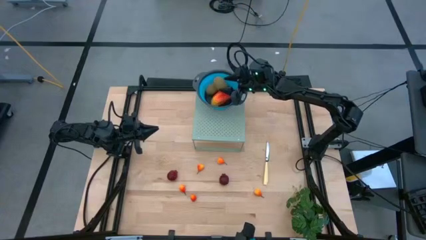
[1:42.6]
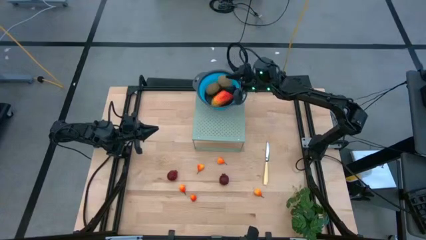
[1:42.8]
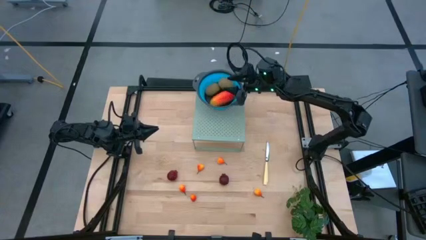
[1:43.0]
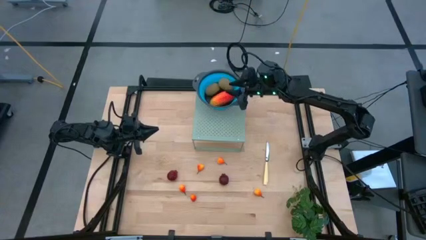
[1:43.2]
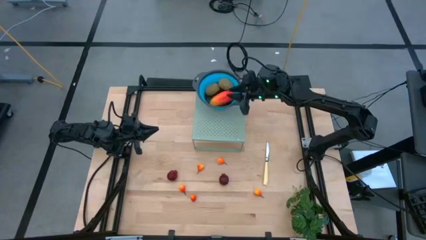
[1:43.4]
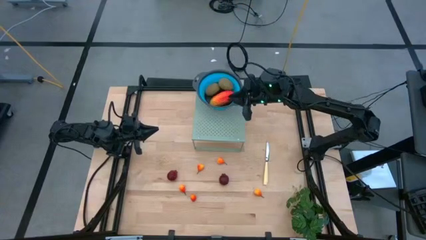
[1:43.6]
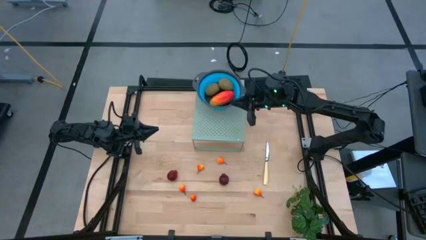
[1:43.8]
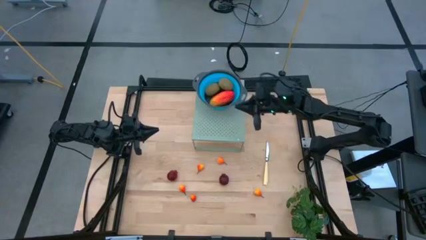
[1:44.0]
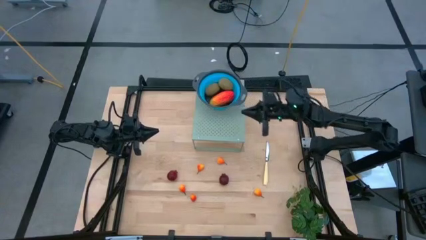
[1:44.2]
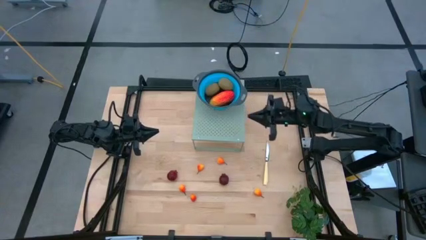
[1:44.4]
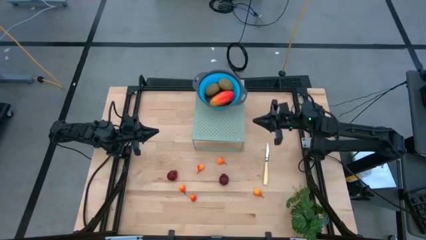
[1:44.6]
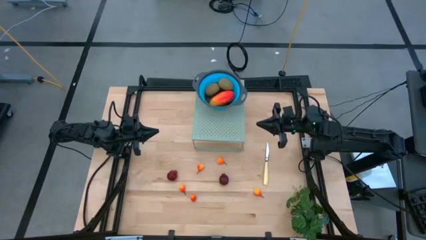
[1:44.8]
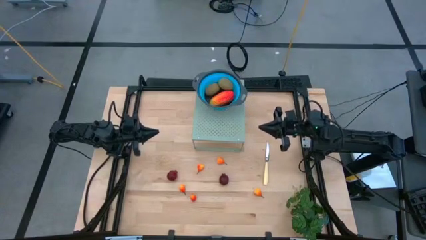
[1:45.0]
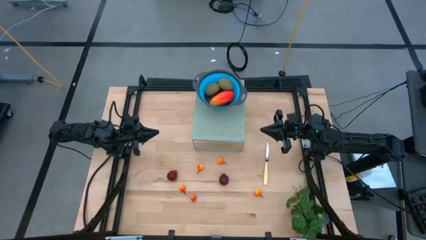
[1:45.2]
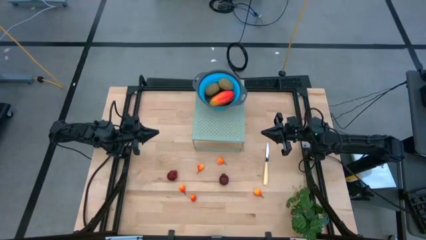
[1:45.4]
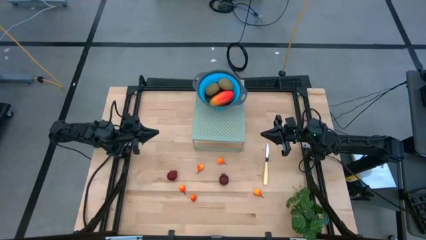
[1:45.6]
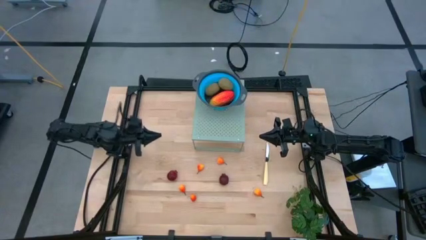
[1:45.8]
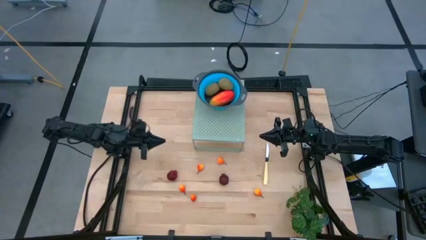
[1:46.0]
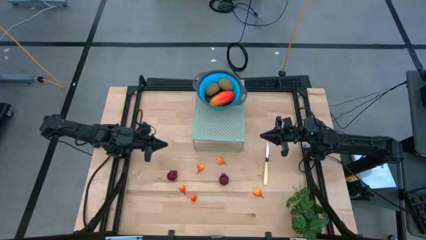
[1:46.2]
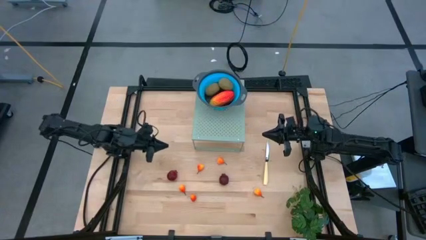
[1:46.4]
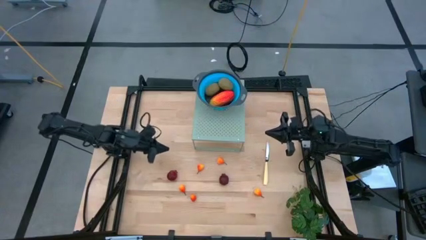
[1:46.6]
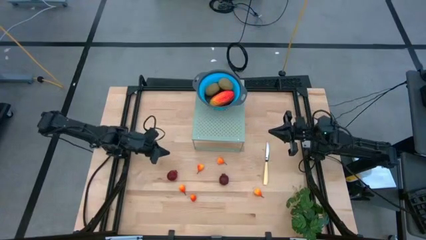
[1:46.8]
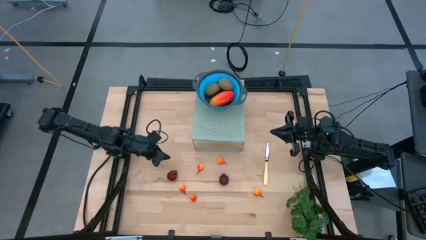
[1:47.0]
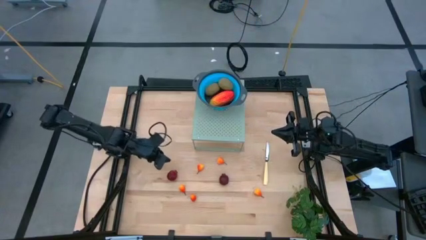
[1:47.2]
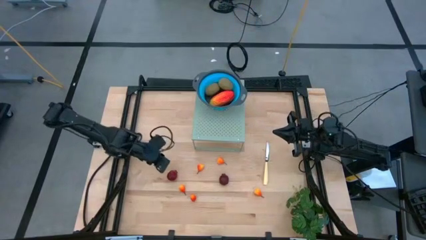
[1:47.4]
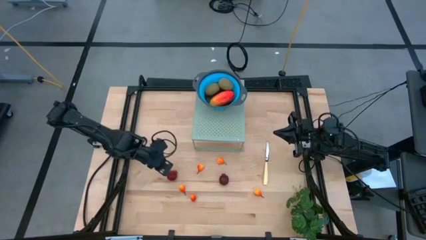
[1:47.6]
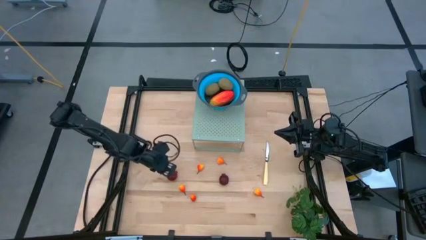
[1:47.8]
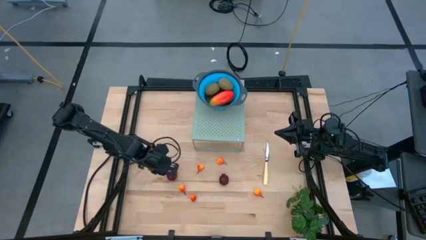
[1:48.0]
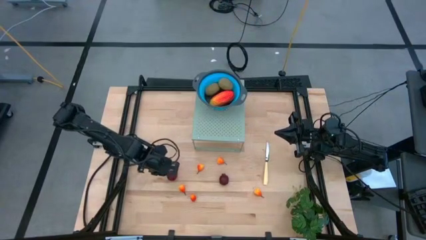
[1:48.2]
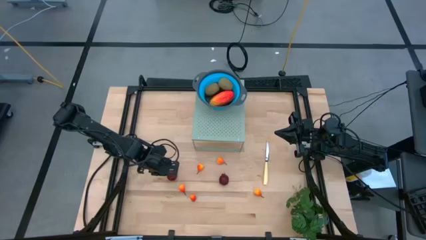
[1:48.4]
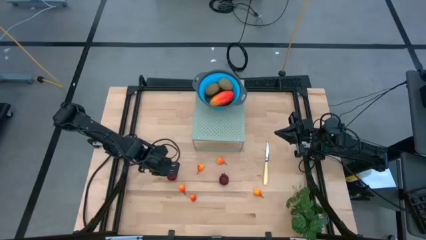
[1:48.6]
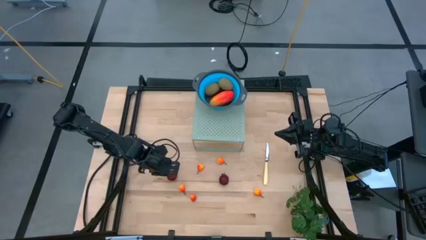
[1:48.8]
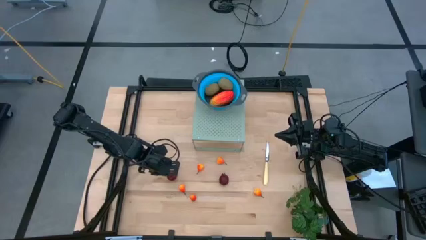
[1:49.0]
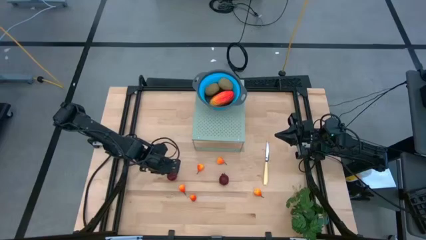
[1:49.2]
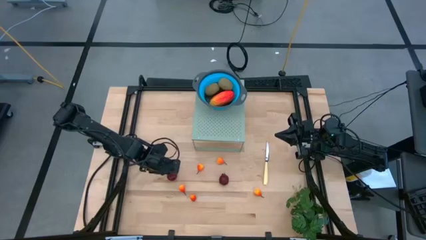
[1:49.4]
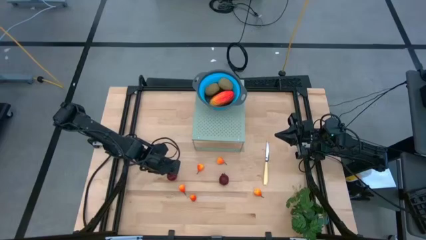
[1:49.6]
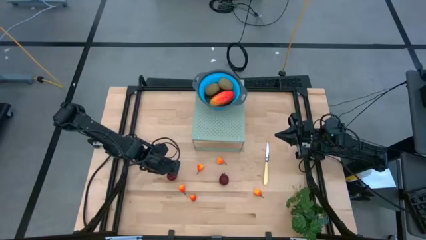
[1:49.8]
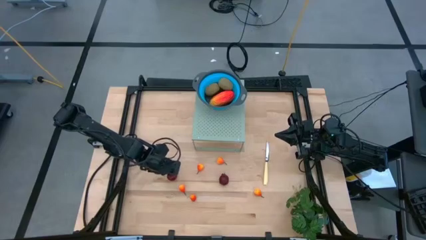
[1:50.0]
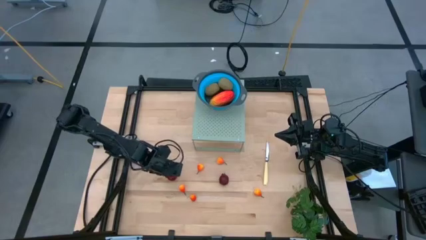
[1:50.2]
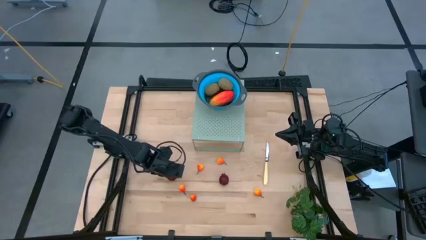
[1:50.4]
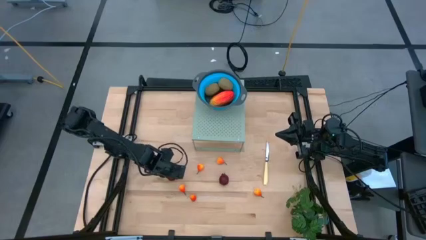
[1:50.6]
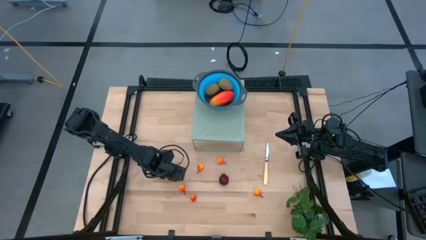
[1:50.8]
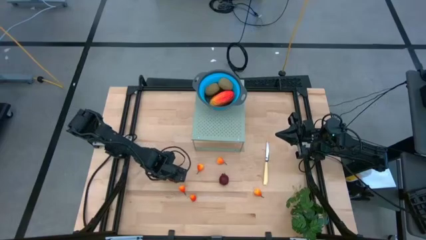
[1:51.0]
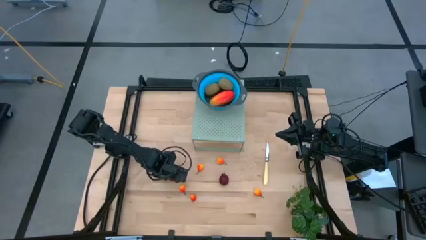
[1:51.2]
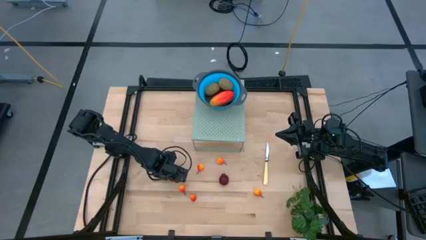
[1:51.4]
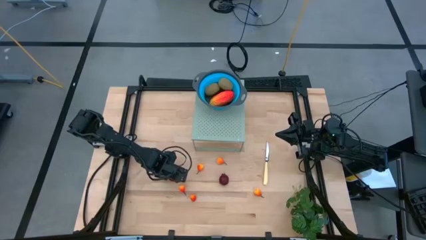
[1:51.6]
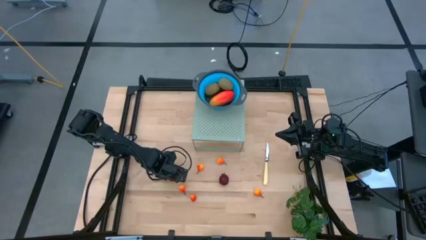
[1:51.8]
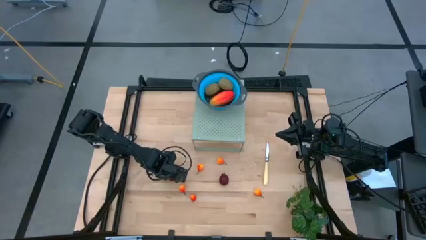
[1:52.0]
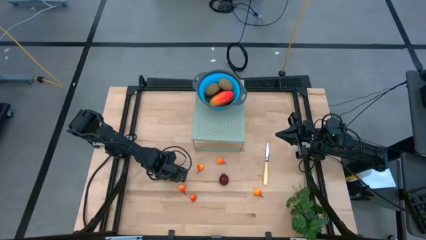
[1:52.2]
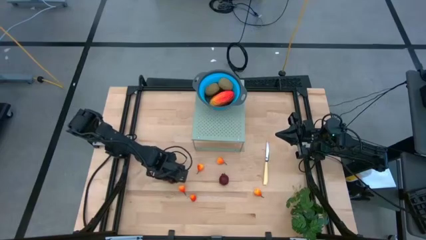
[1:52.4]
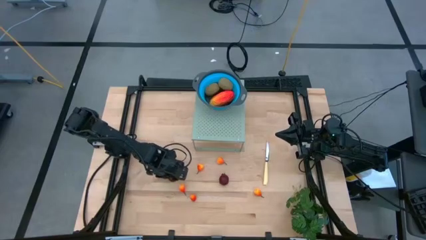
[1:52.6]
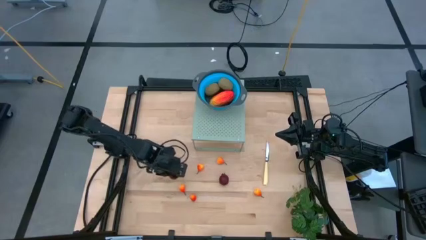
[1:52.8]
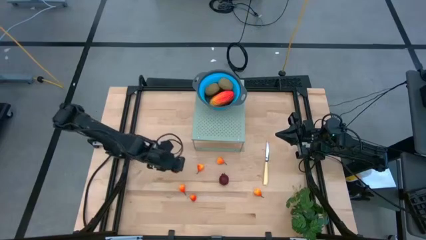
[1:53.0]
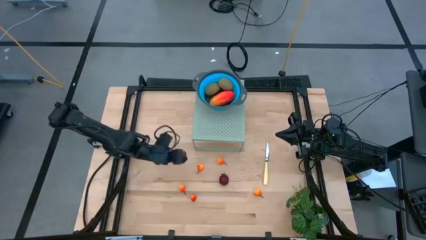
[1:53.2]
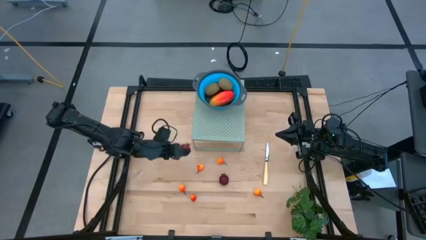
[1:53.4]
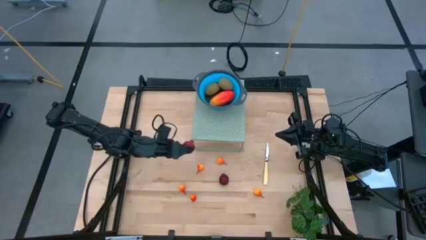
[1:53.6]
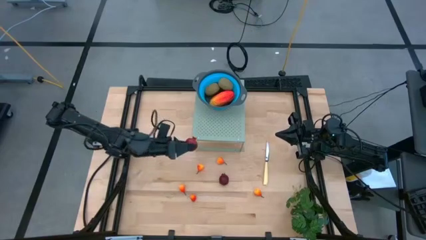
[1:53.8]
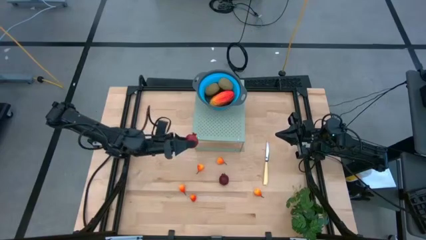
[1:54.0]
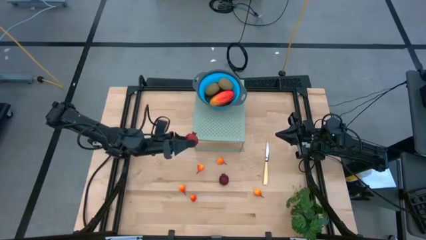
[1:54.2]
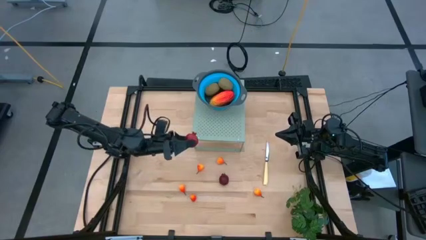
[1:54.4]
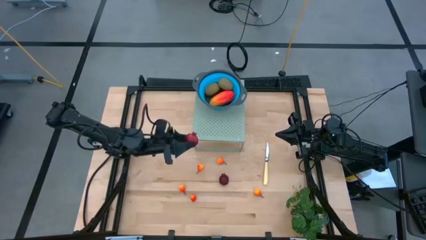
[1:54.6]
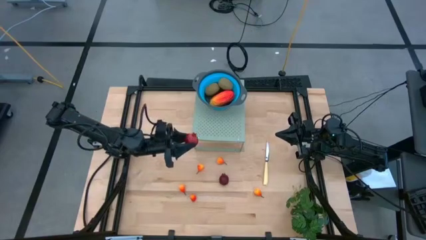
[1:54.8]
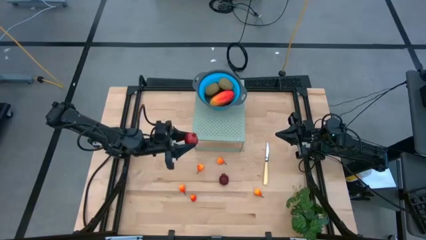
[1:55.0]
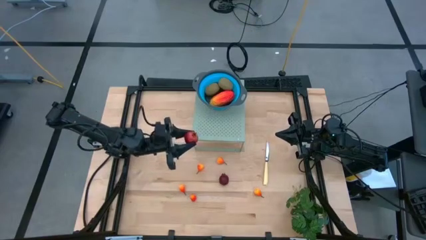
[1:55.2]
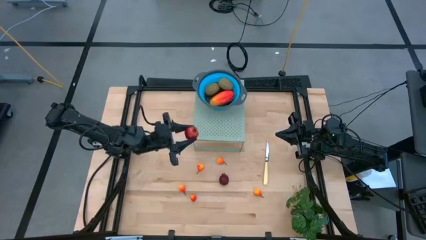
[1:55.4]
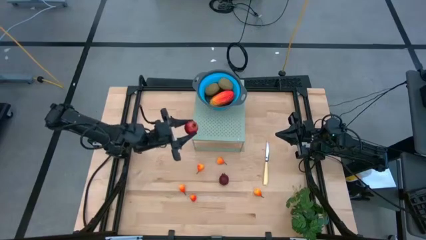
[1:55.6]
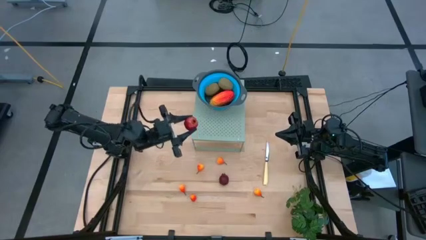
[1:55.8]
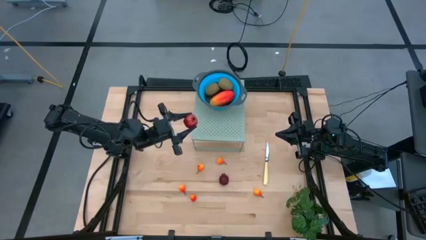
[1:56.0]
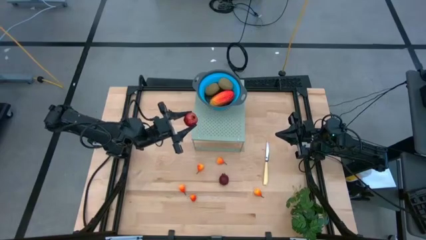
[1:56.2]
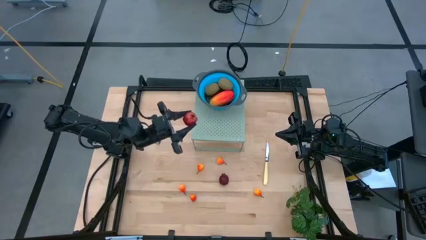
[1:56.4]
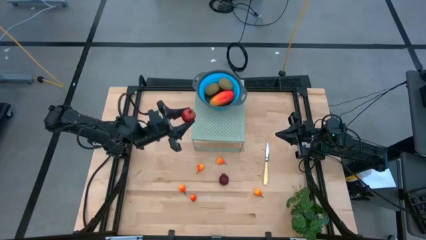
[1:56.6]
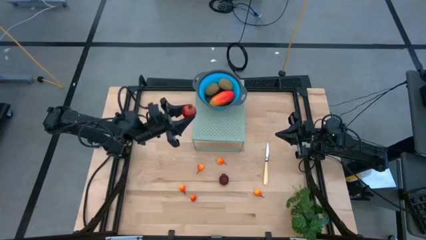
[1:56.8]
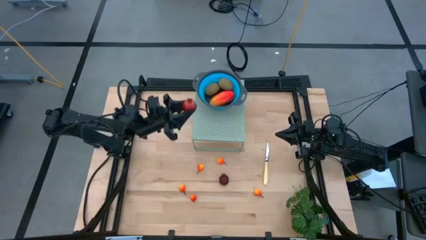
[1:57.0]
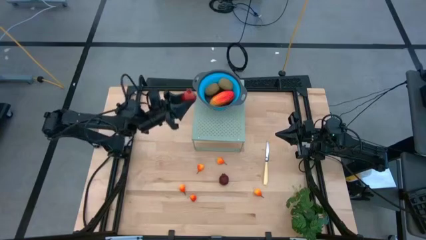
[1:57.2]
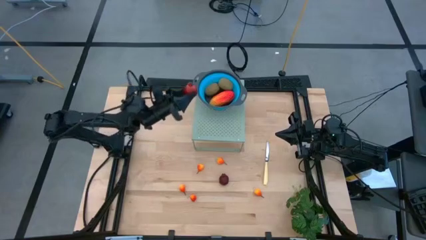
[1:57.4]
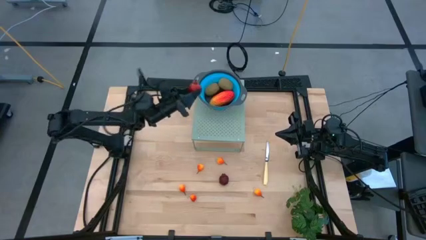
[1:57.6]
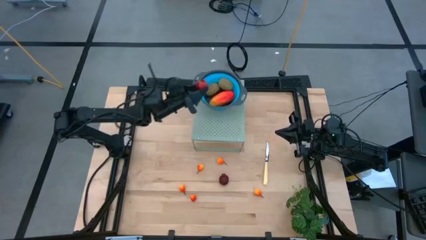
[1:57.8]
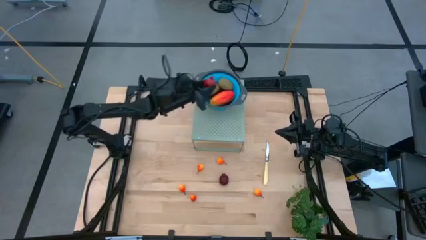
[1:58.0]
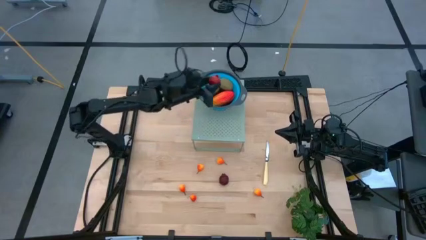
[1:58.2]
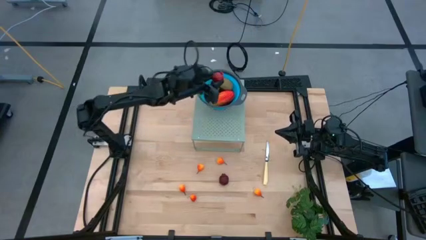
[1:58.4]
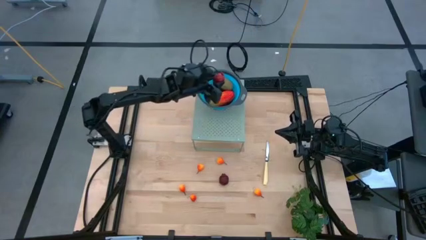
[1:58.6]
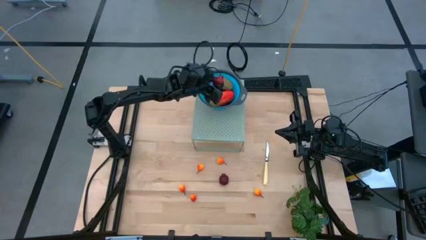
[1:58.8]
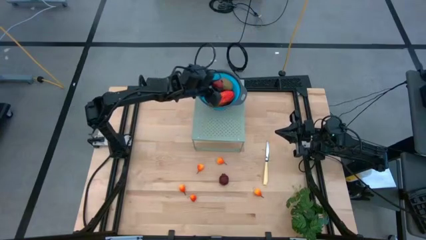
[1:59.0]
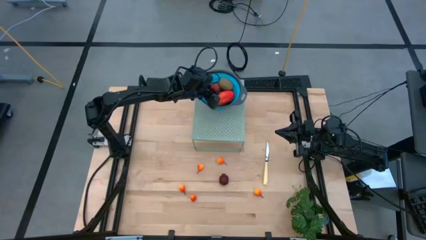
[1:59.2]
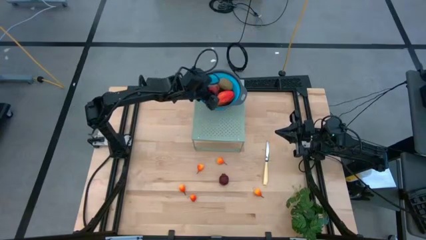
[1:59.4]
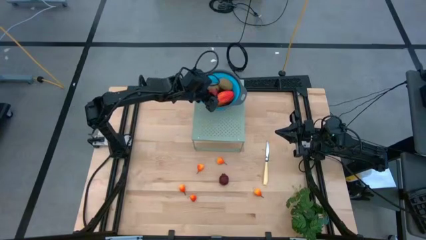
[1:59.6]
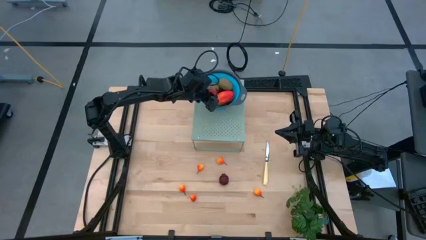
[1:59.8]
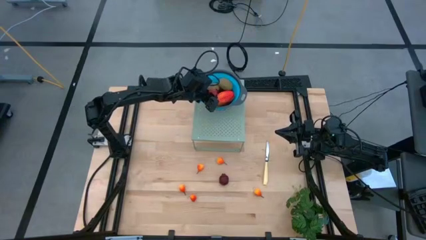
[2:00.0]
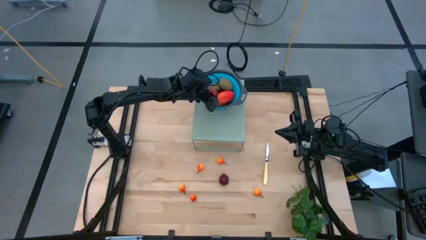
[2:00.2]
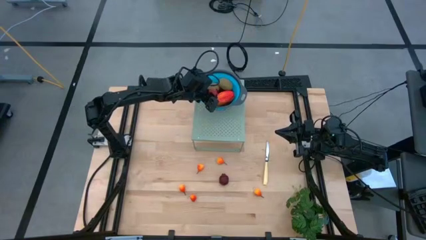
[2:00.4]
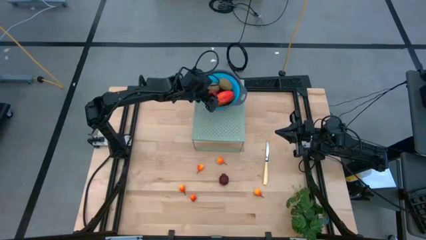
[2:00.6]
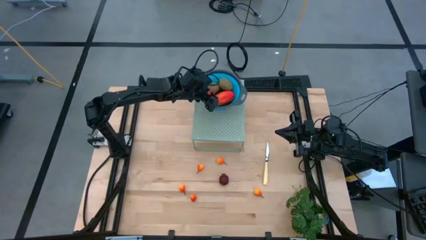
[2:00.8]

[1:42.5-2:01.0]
Task: Pick & Place Fruit
Put the pomegranate into the blue strainer bowl on the shelf
